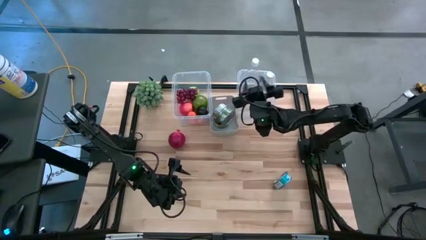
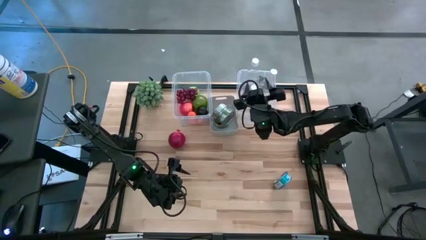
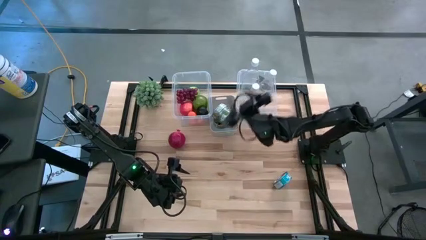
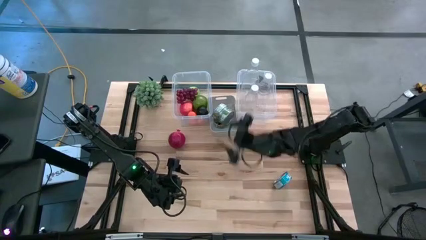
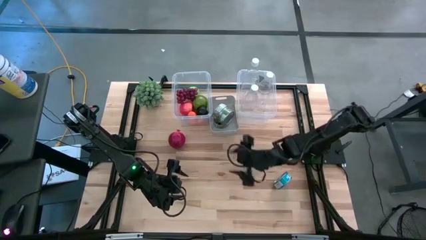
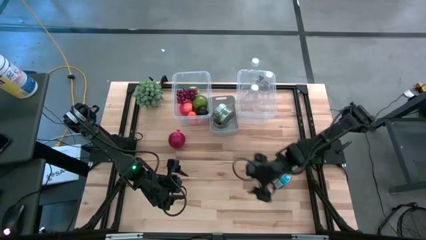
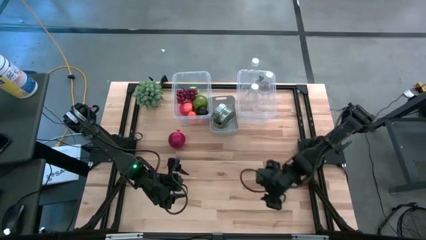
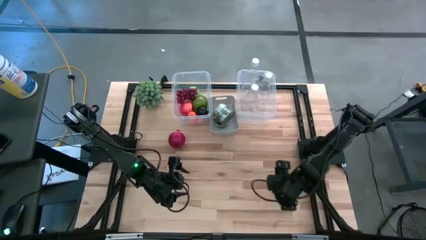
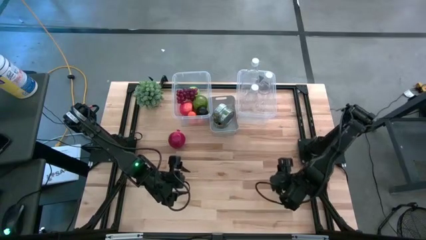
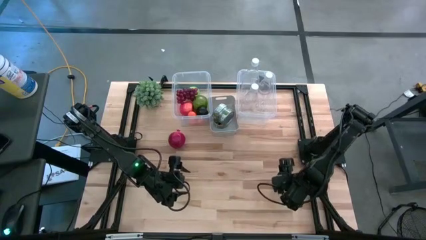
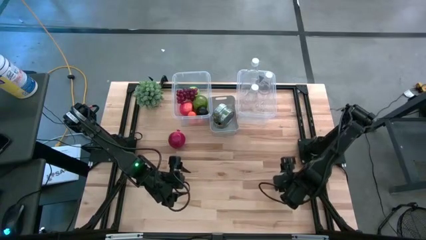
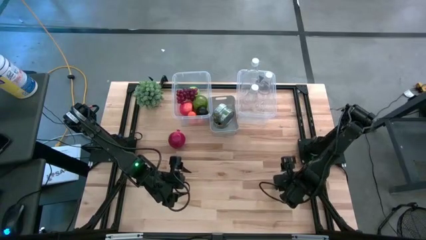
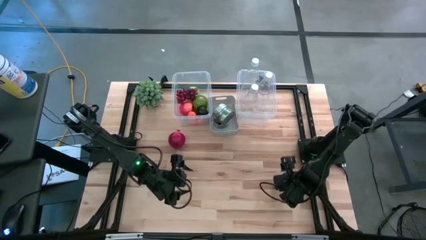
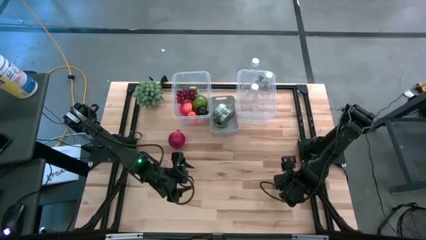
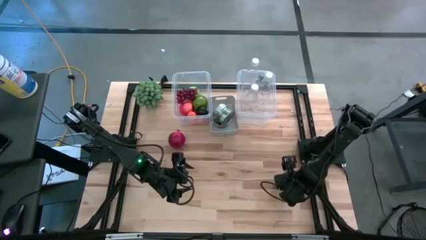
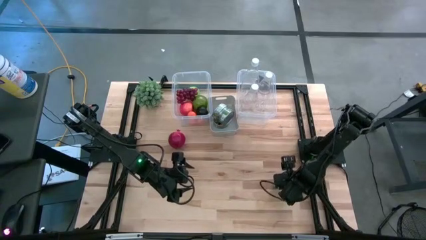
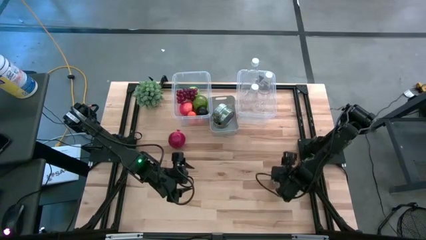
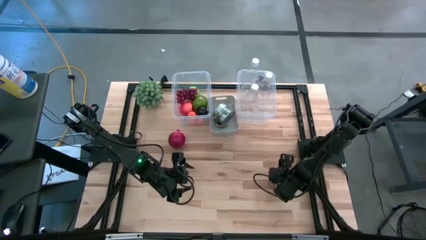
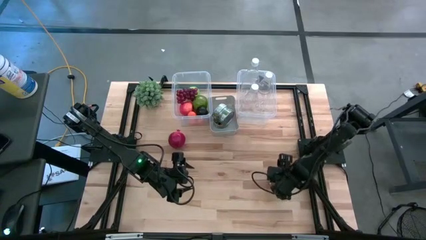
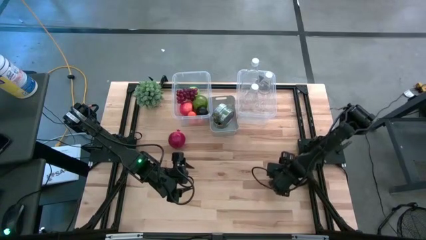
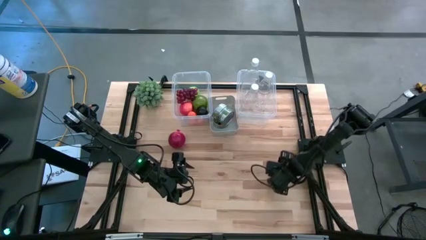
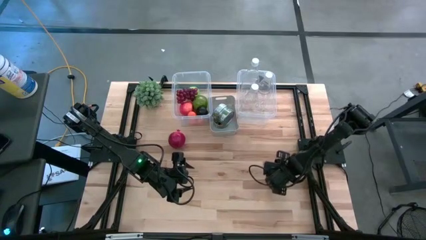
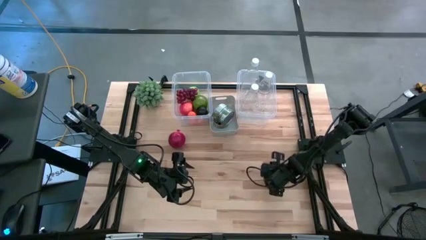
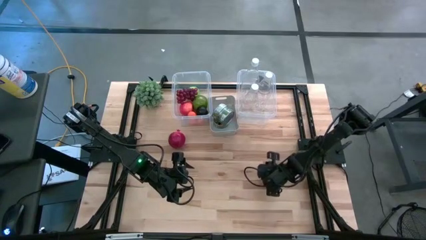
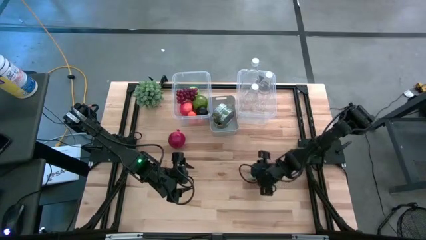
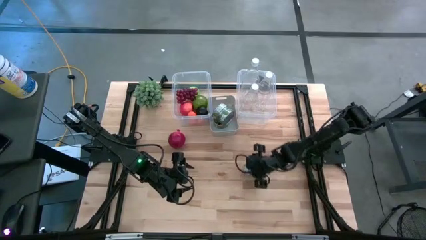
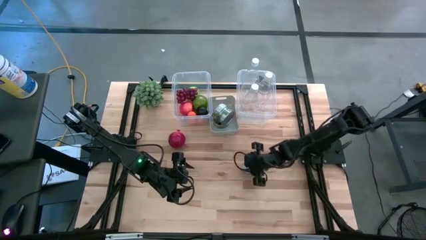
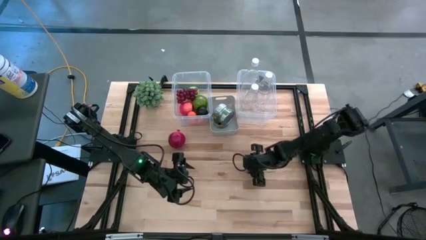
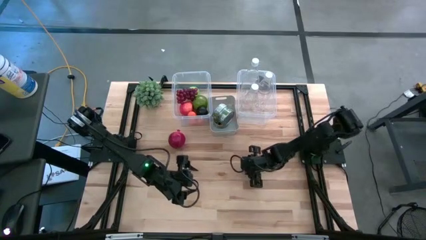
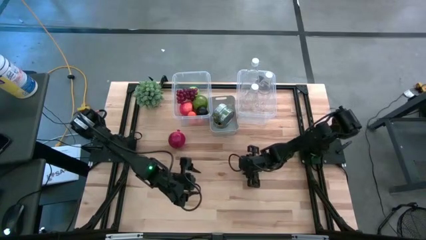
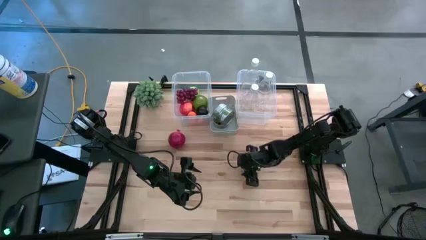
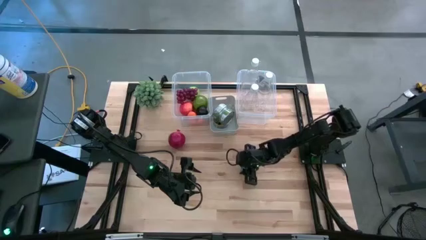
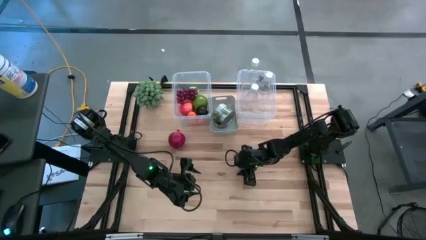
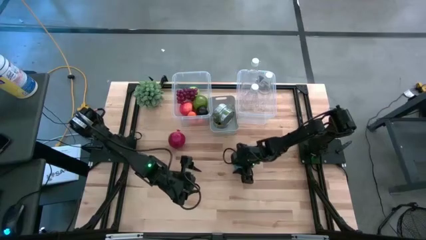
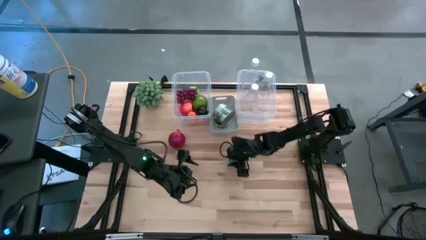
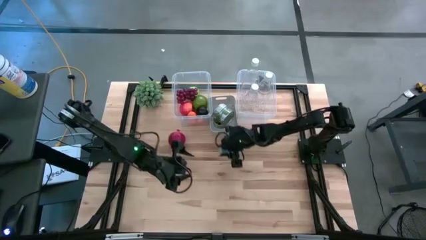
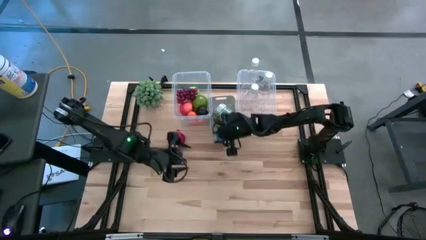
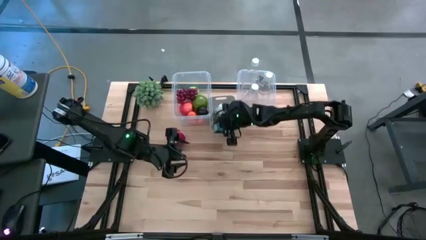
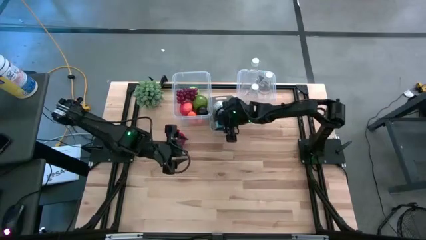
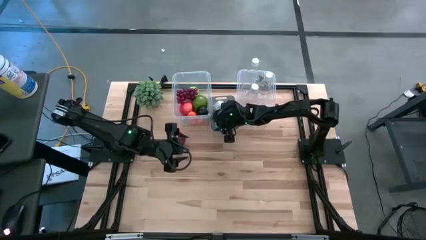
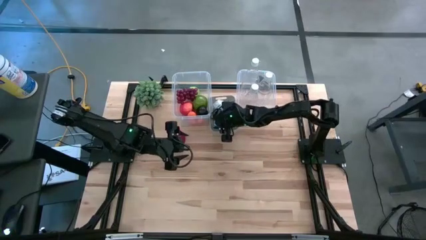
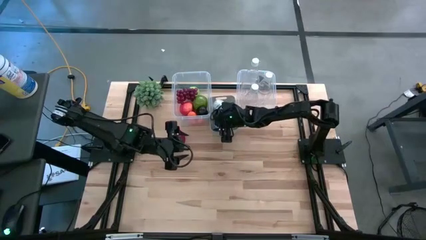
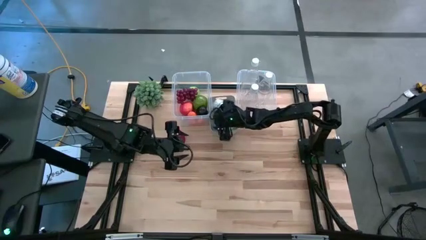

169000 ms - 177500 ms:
Task: Pick & Place Food Item
Put the yellow blue tuna can into the gray bin

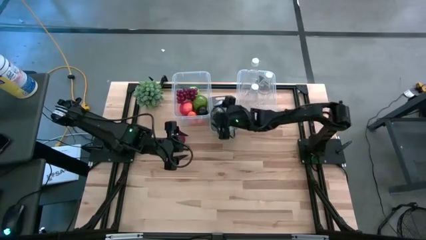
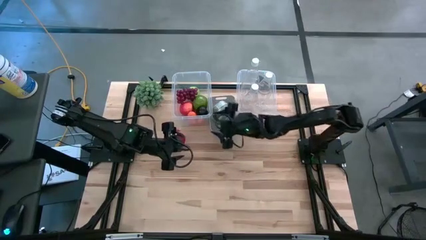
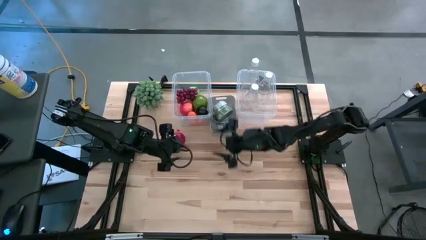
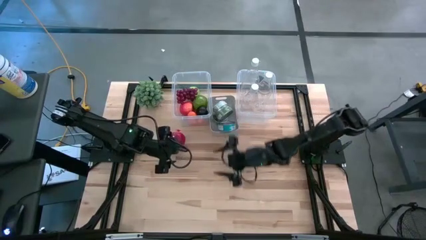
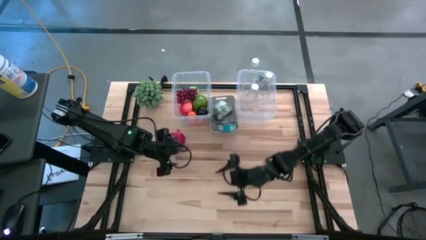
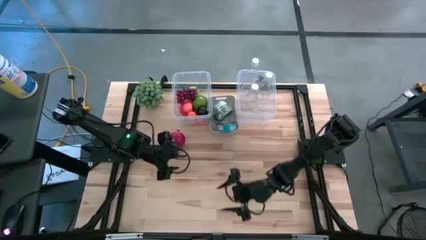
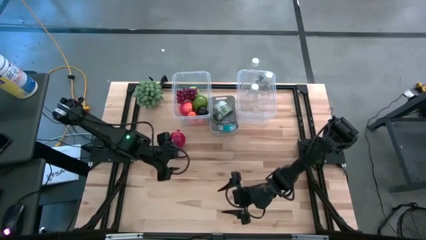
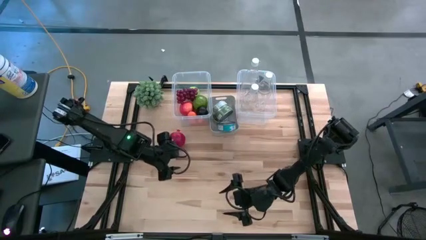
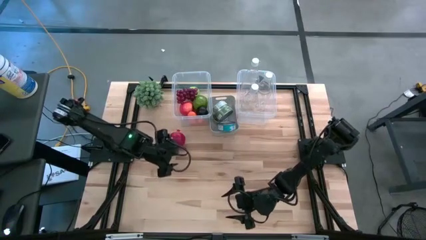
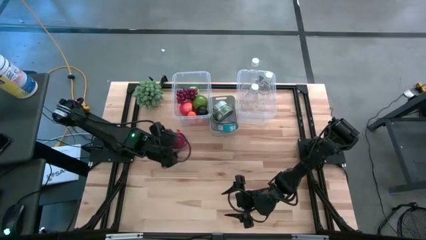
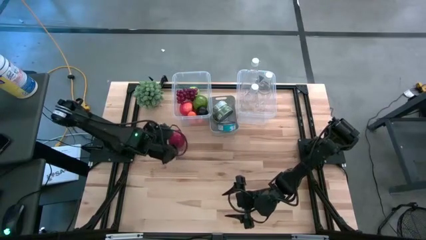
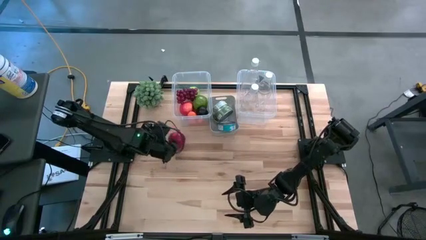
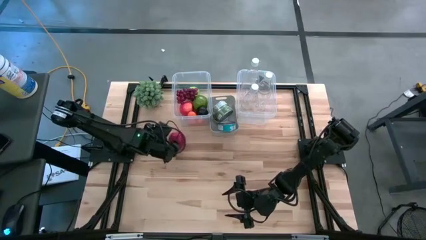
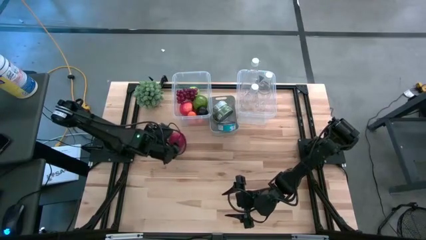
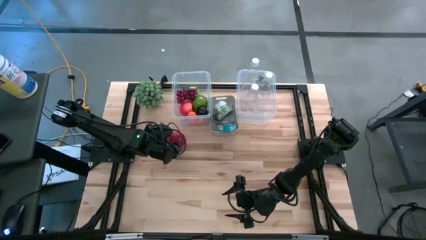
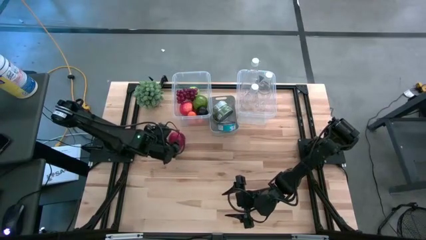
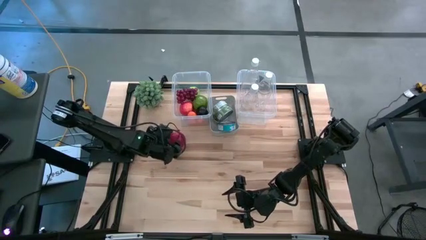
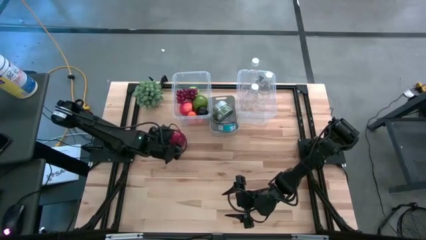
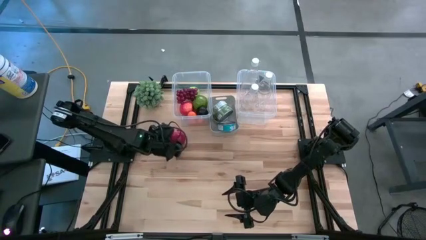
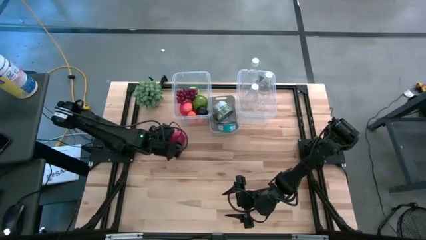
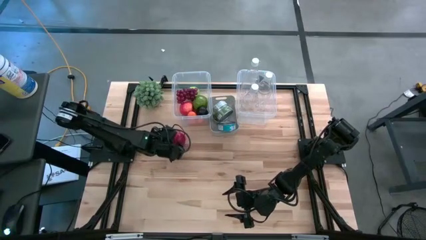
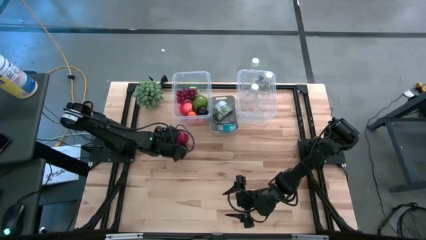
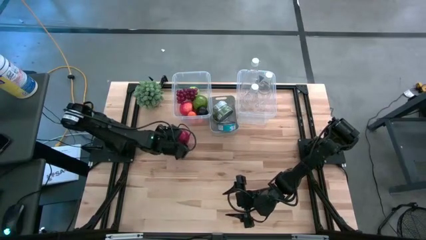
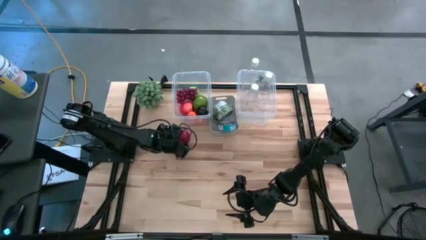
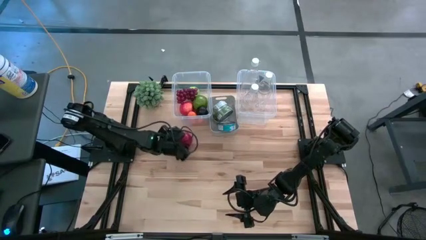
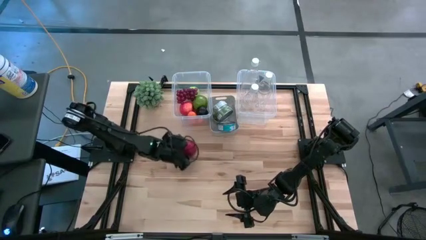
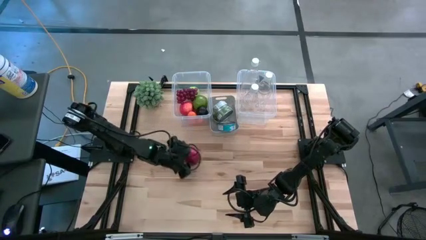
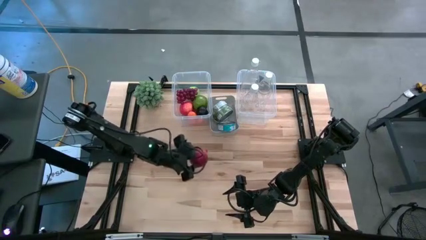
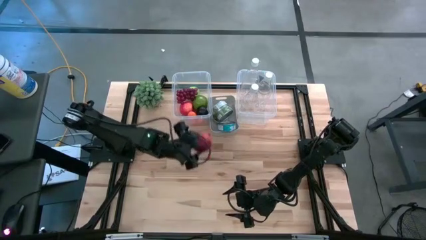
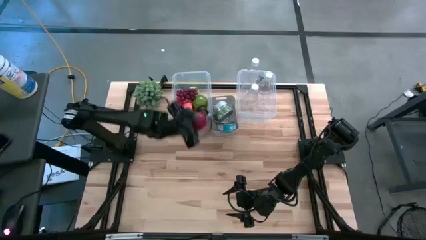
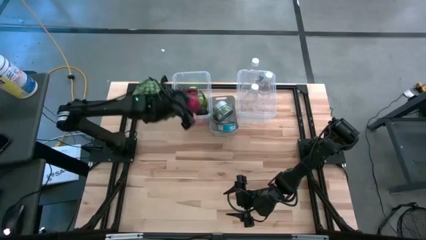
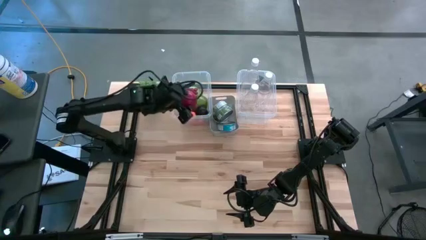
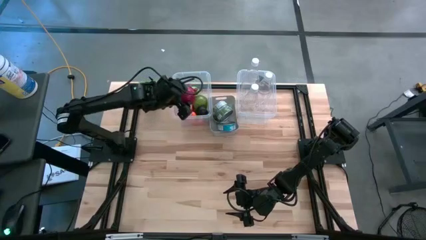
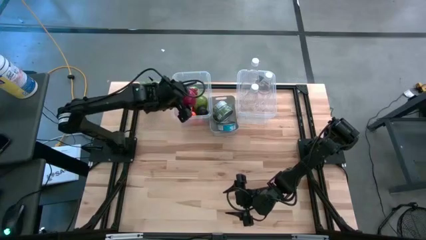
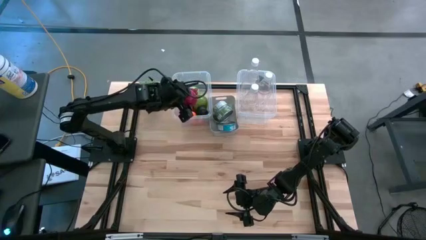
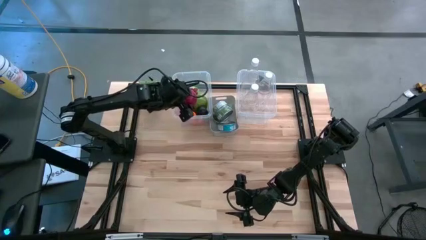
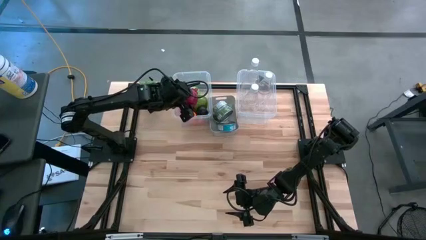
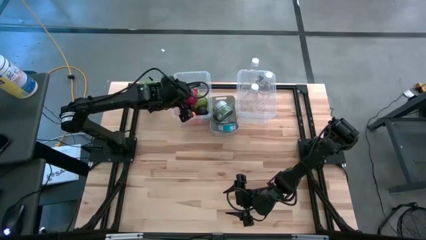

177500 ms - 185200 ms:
Put the pomegranate into the left transparent bin
